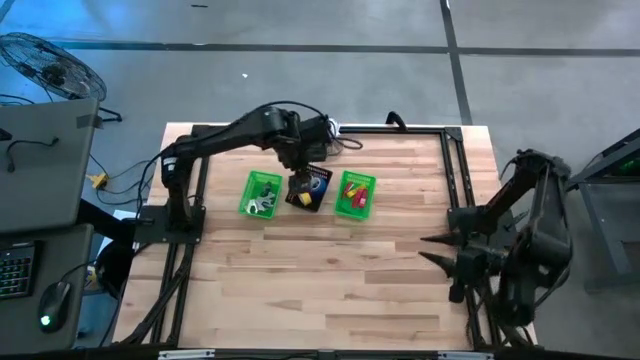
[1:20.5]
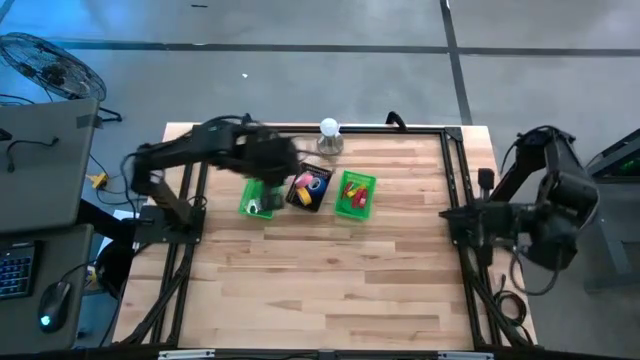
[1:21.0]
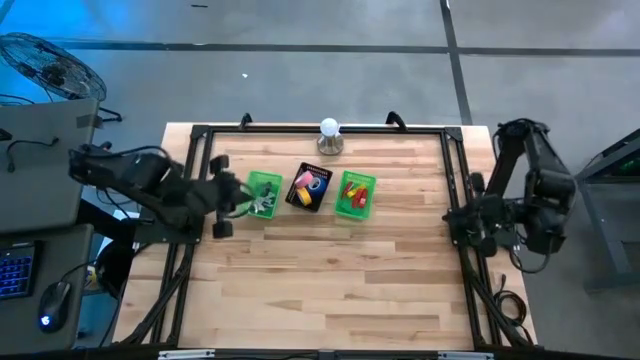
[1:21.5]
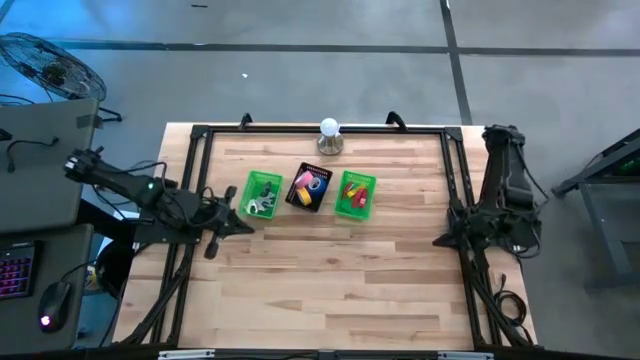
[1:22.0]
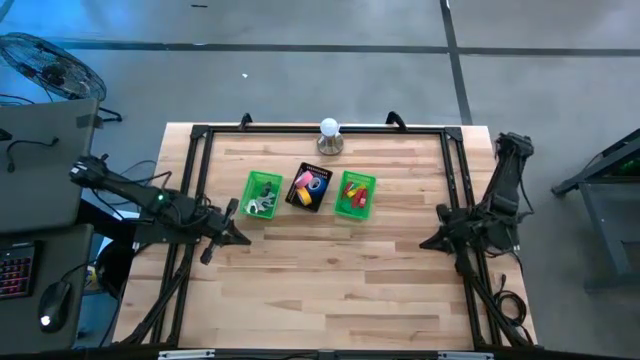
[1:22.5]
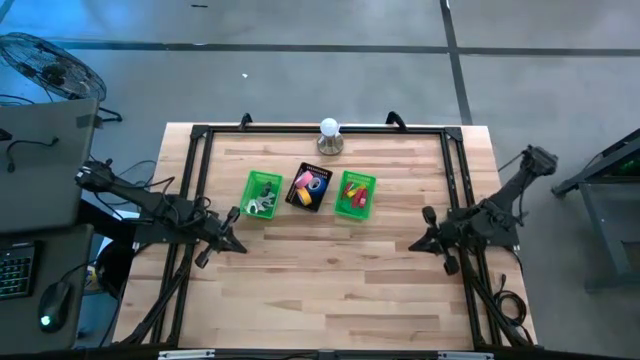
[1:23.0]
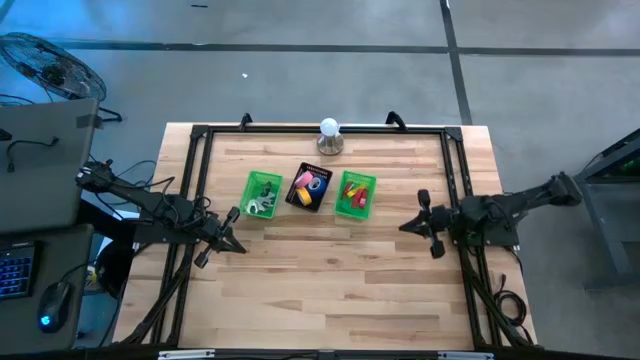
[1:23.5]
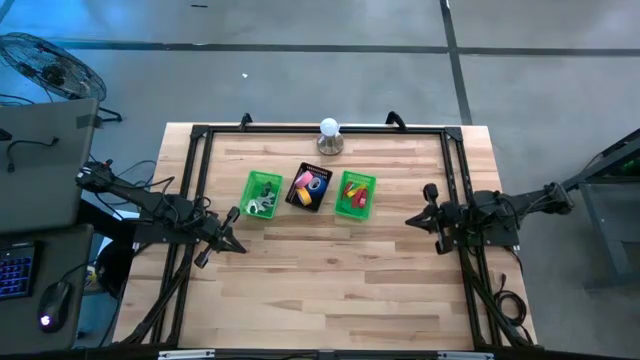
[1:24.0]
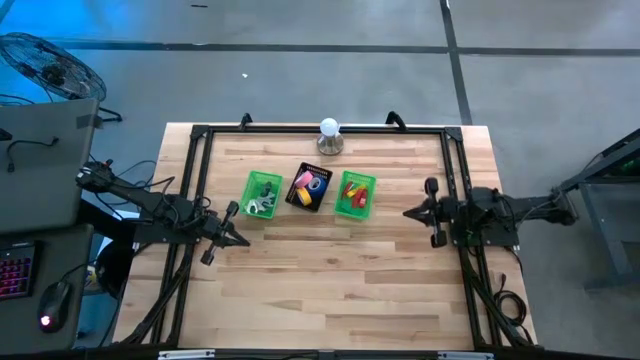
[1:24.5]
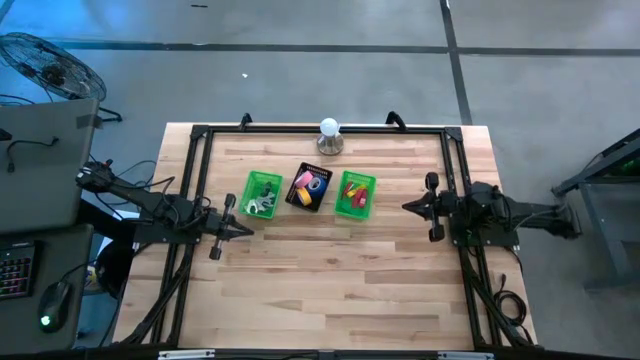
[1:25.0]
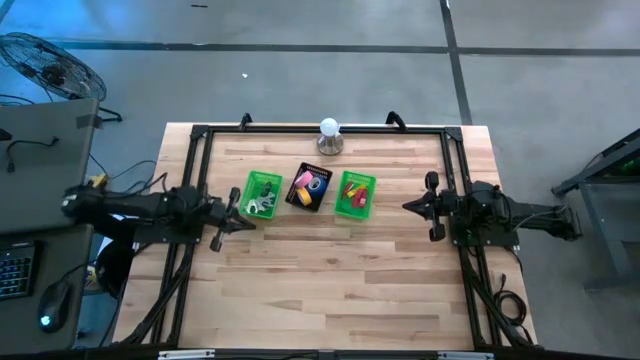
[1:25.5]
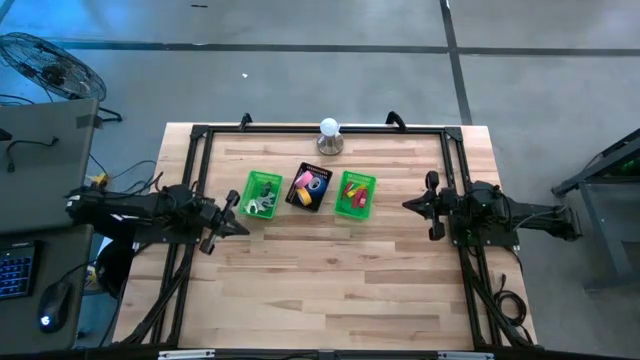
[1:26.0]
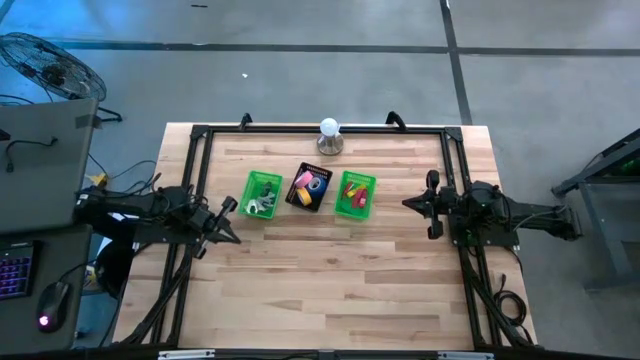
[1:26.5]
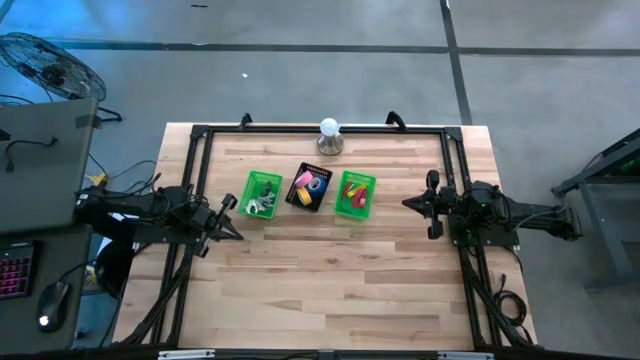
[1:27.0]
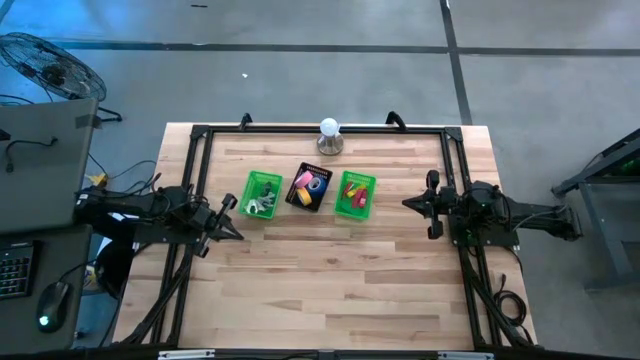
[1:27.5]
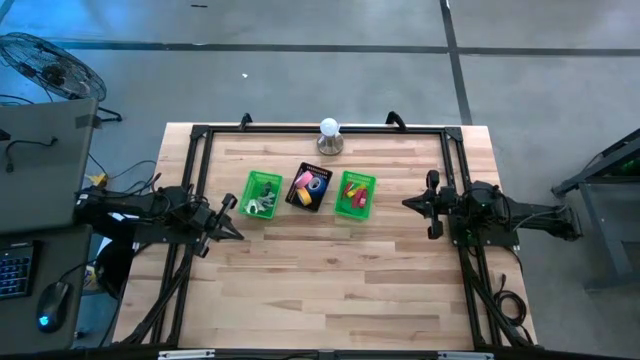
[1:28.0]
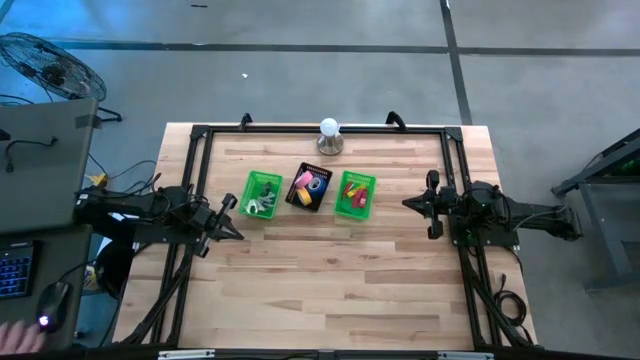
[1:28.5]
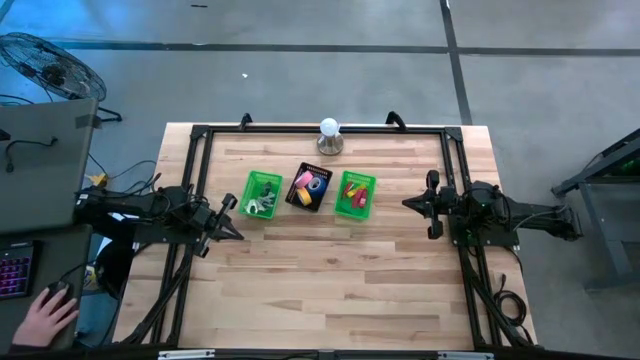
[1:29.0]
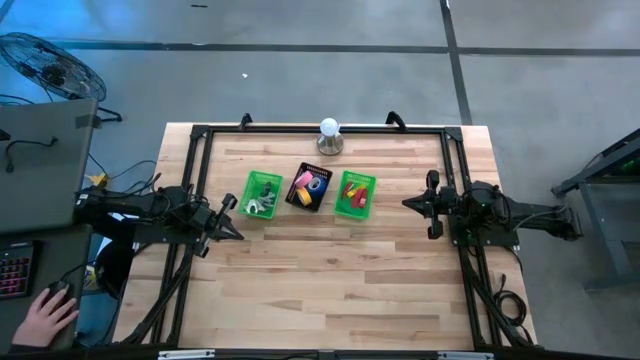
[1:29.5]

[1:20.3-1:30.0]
Task: Pick and place Stapler, Stapler remover, tape
Return to Home Position

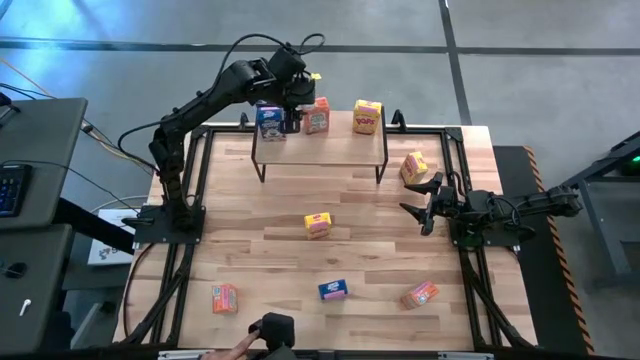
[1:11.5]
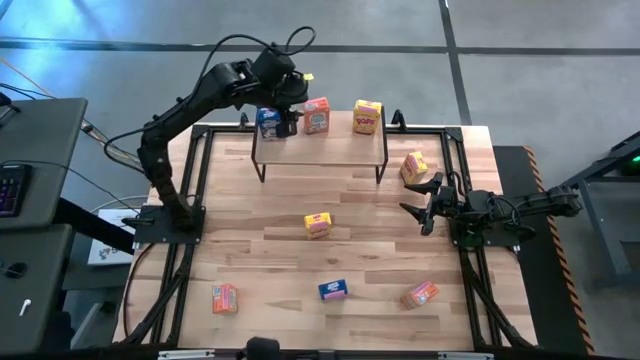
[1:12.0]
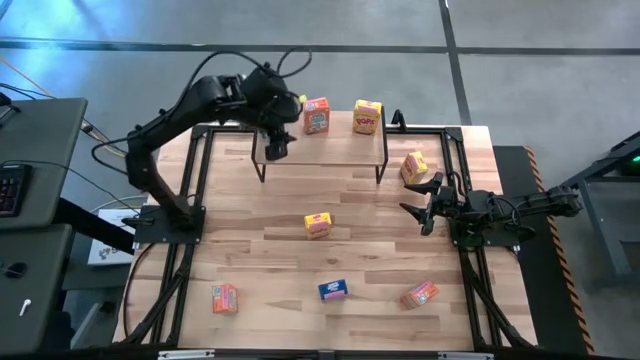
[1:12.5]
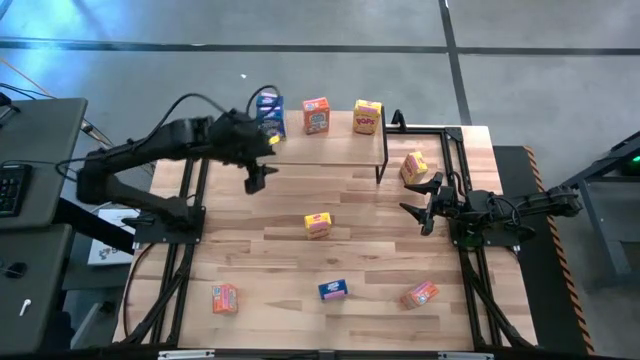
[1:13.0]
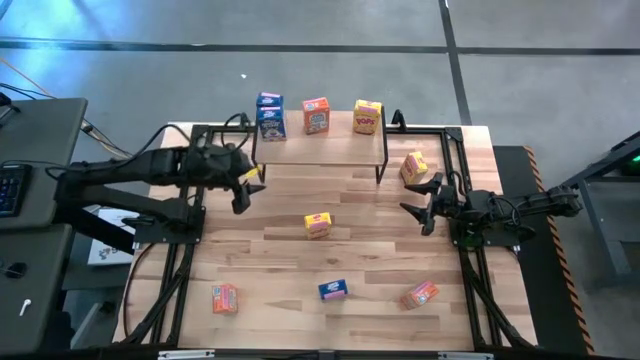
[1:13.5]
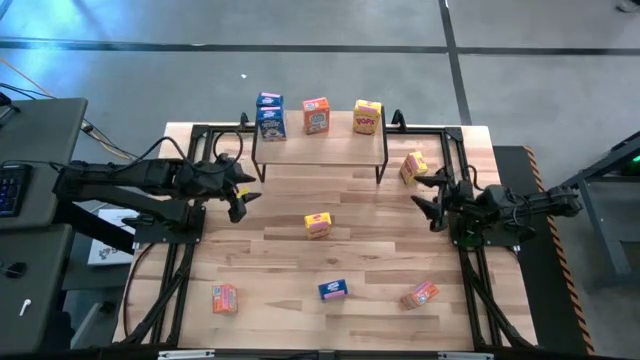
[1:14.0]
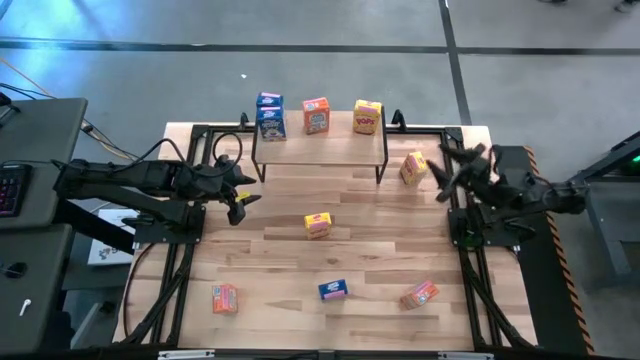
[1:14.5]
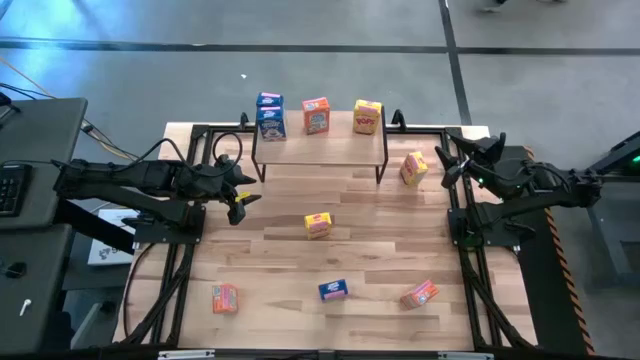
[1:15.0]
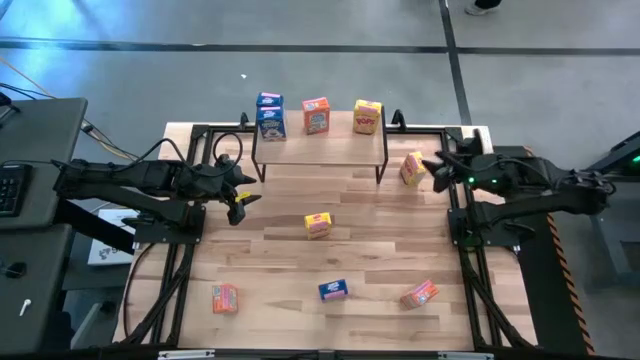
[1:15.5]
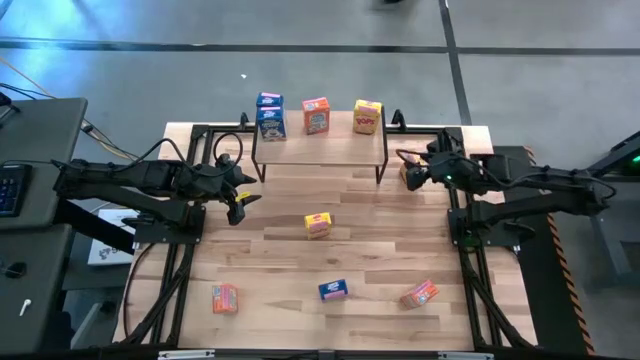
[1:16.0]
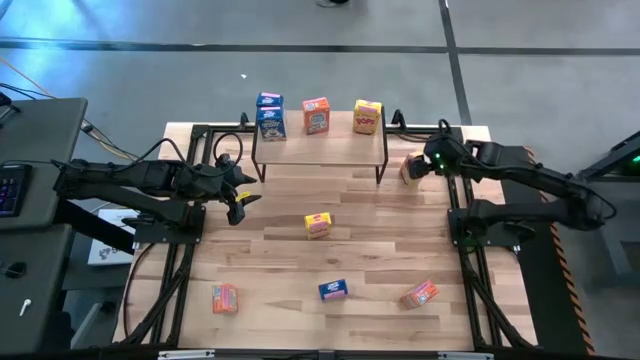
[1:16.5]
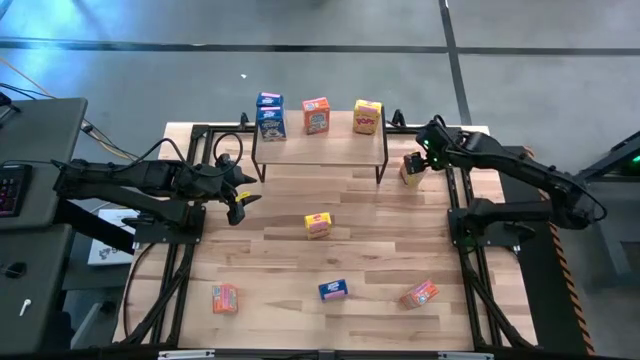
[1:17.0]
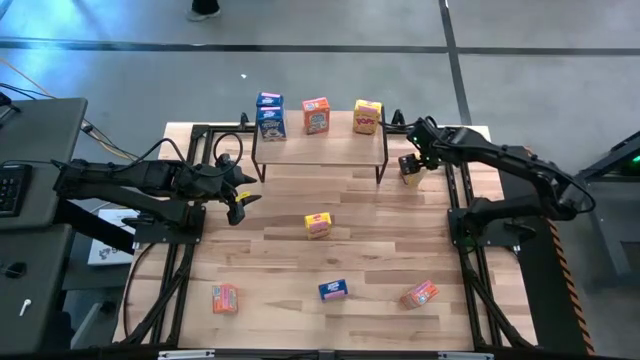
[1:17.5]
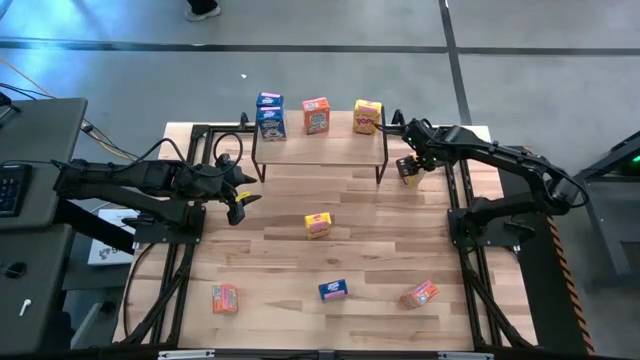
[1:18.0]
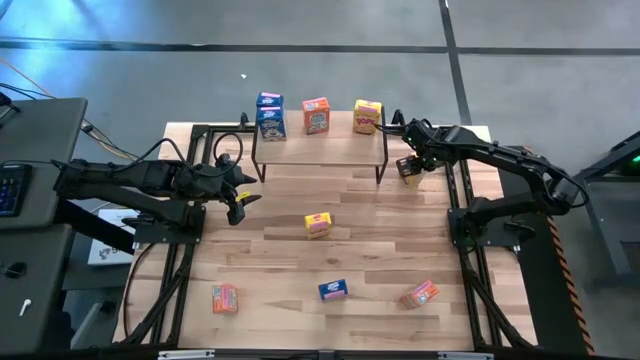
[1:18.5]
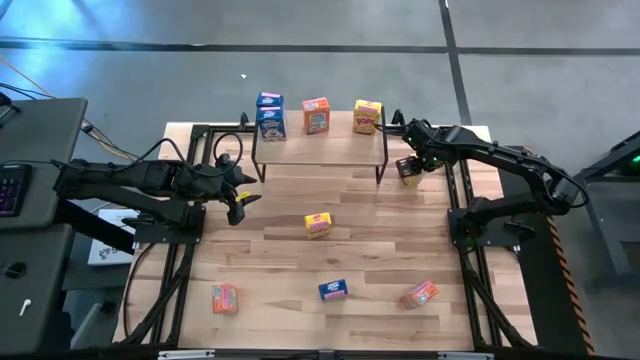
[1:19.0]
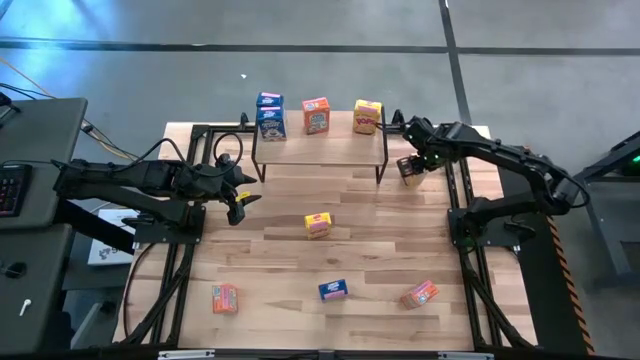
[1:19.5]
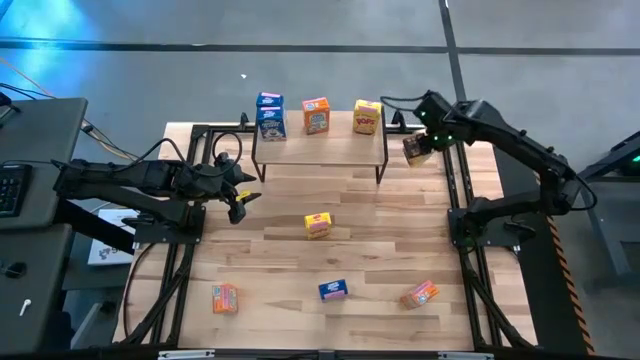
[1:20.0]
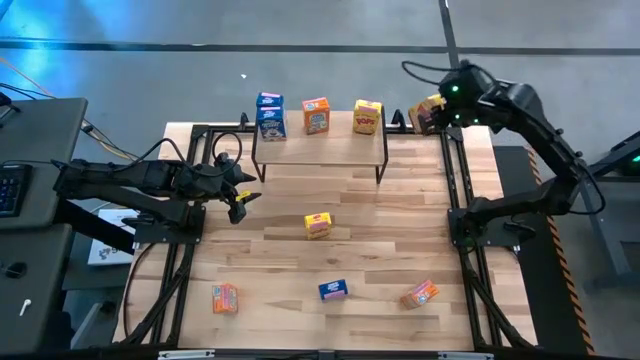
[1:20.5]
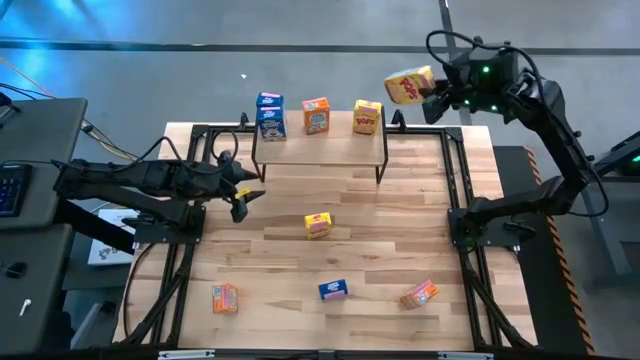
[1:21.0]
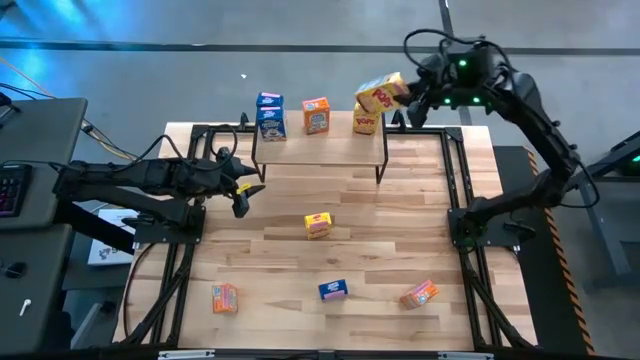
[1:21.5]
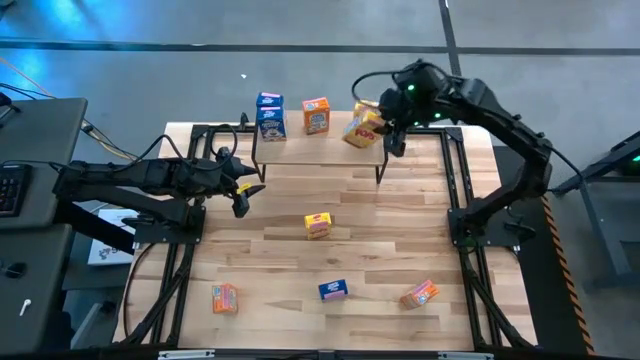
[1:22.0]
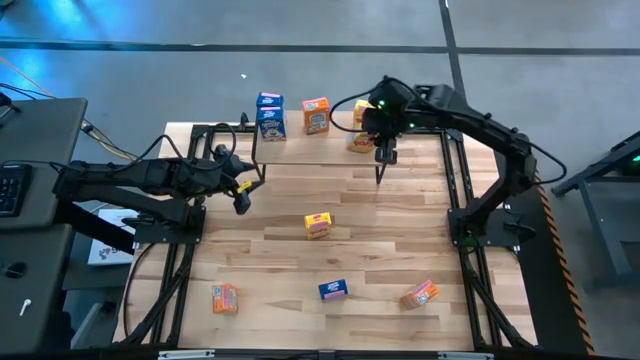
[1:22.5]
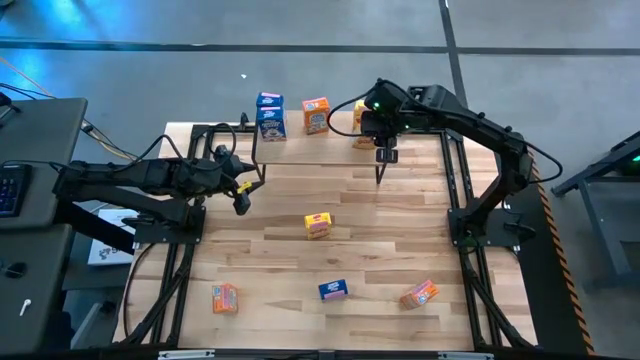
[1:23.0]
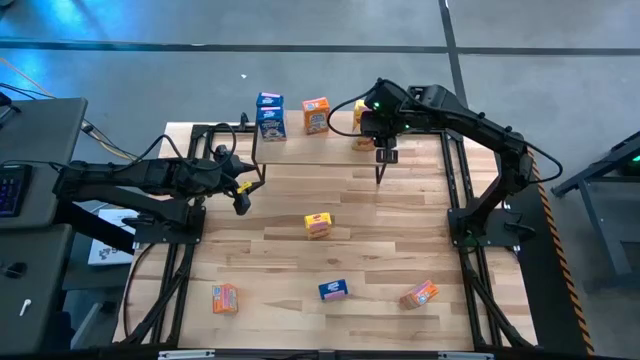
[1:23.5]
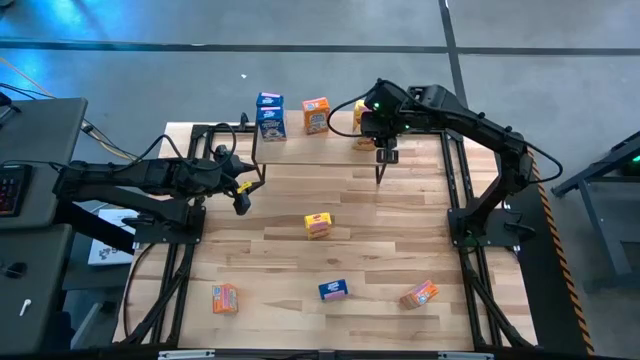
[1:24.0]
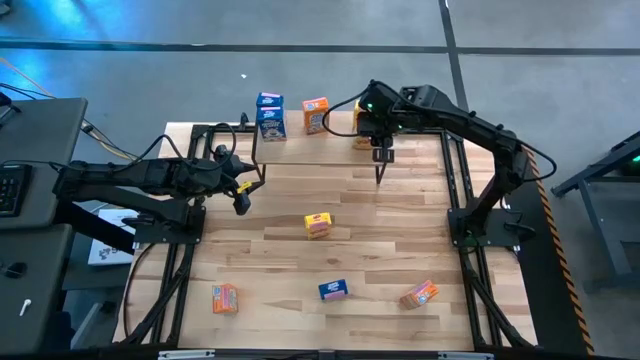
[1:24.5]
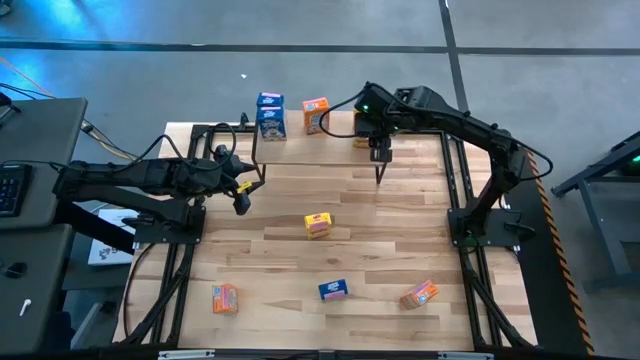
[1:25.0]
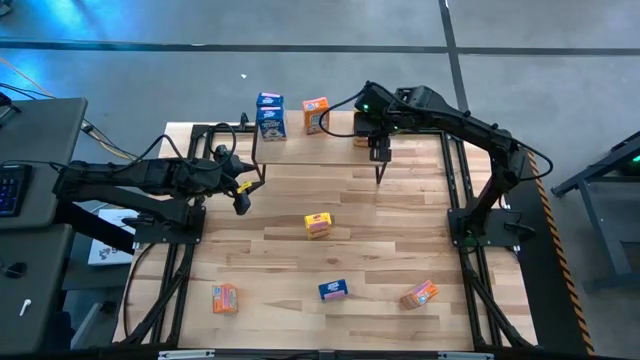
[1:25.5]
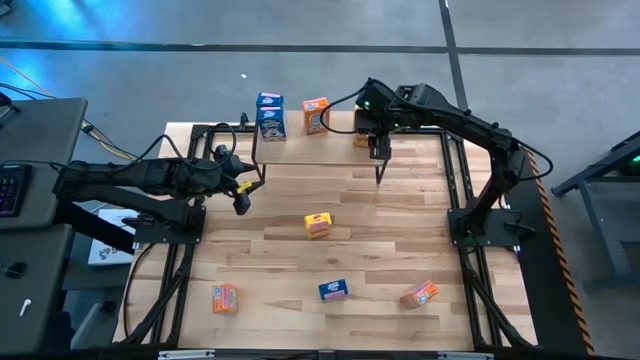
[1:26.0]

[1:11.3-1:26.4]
Task: Stack cereal on shelf
Put the top yellow cereal box on the shelf aligned with the other yellow cereal box
